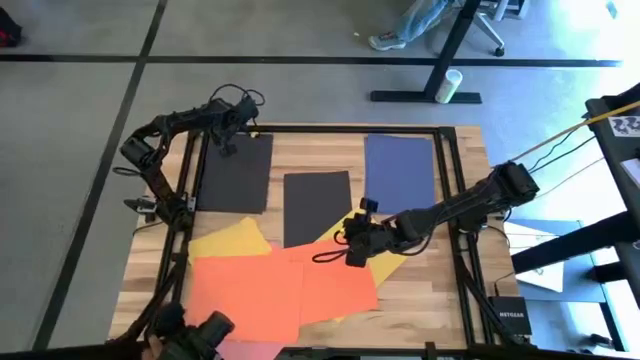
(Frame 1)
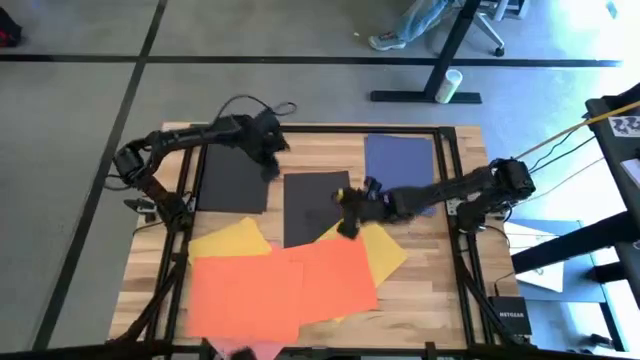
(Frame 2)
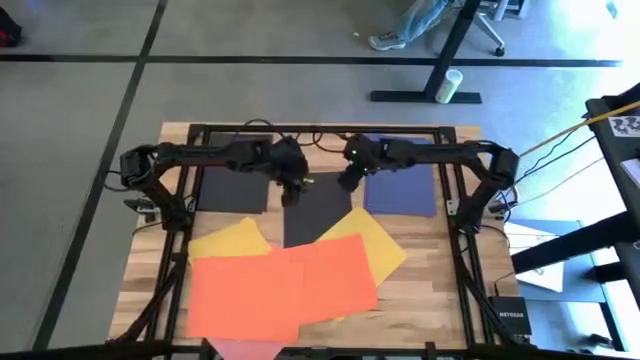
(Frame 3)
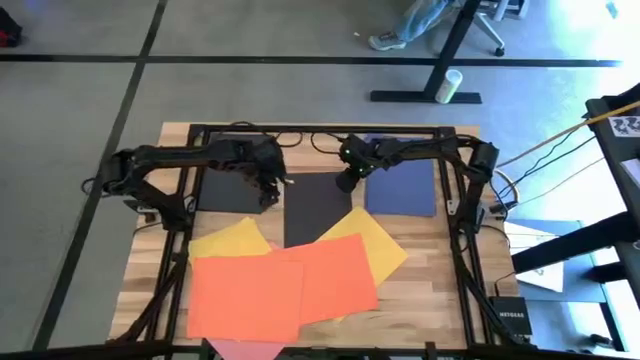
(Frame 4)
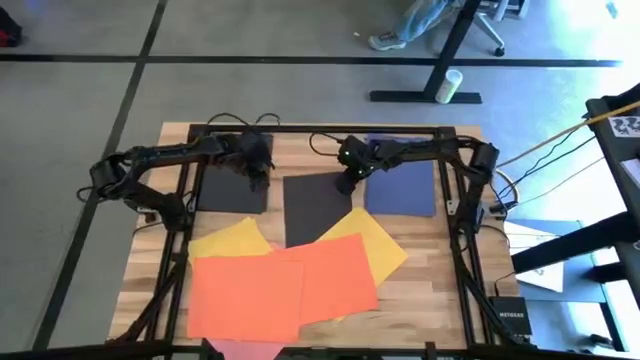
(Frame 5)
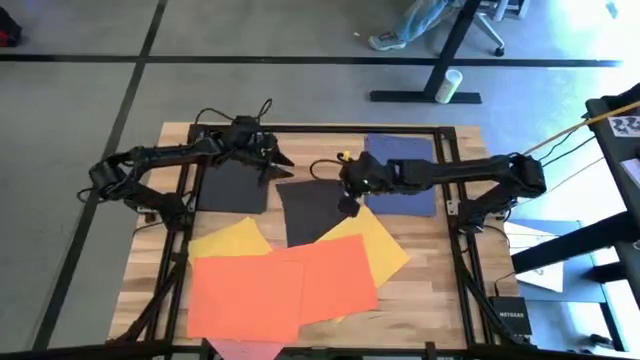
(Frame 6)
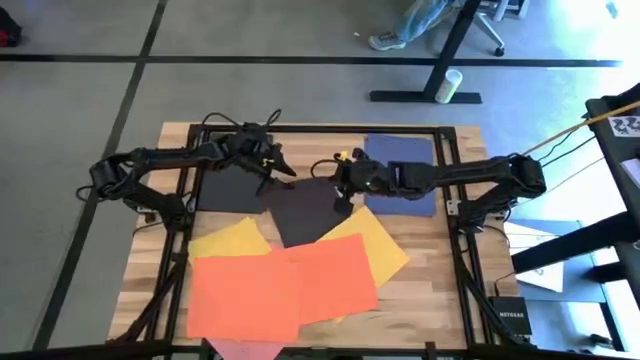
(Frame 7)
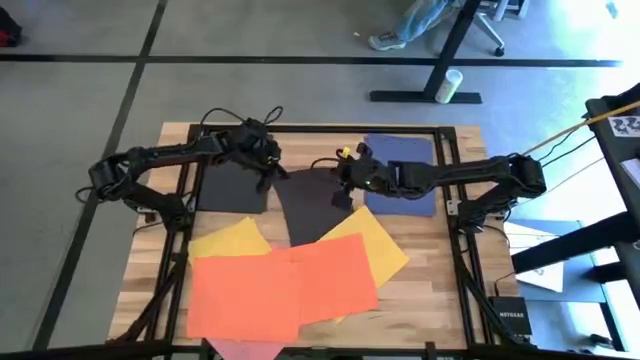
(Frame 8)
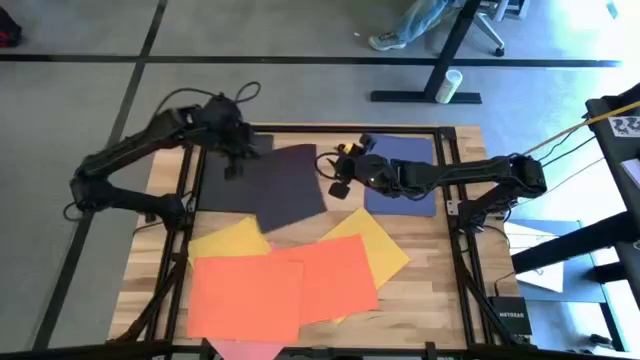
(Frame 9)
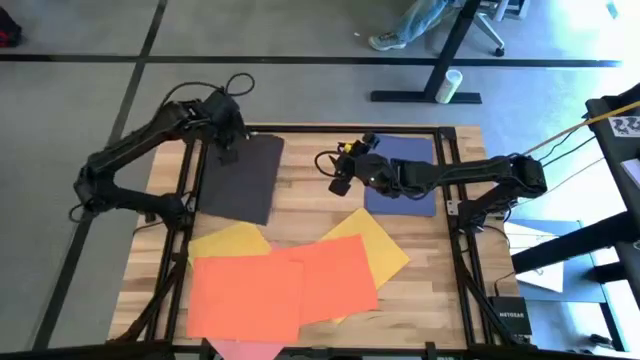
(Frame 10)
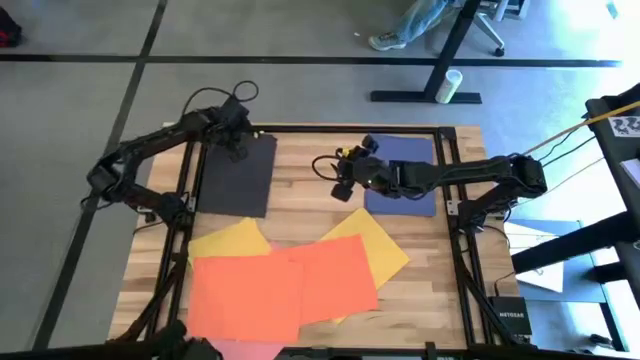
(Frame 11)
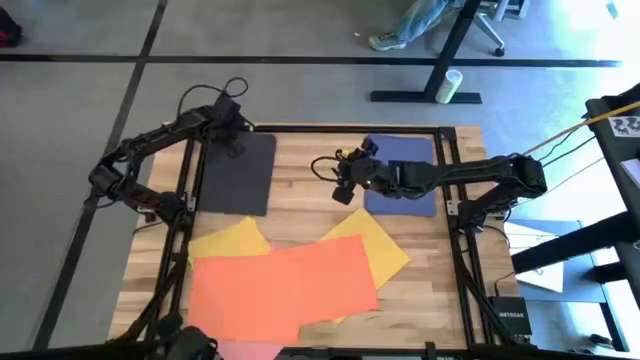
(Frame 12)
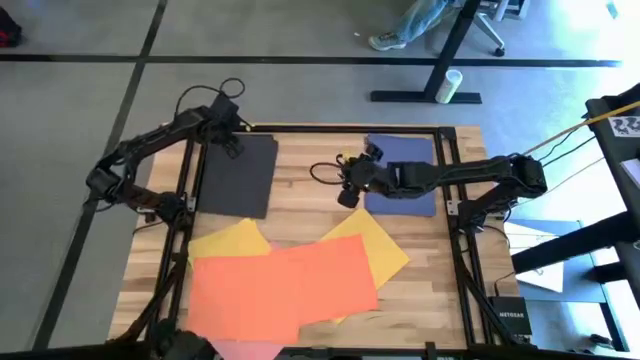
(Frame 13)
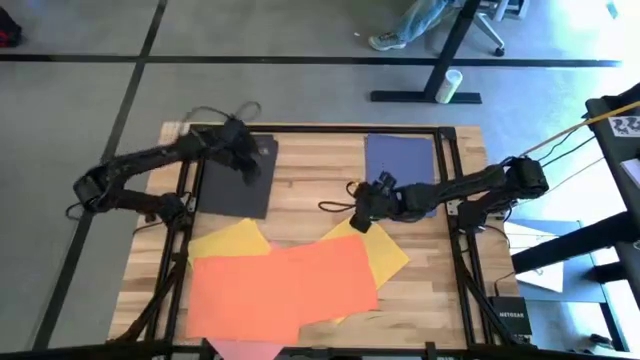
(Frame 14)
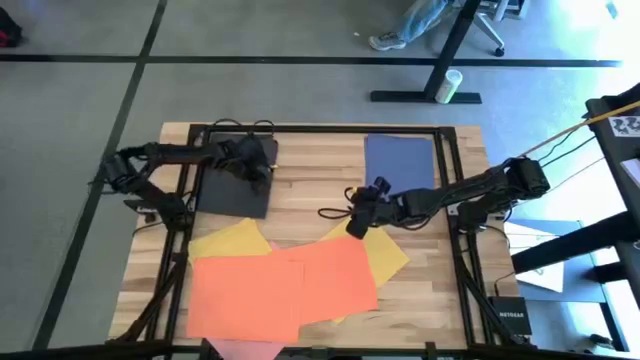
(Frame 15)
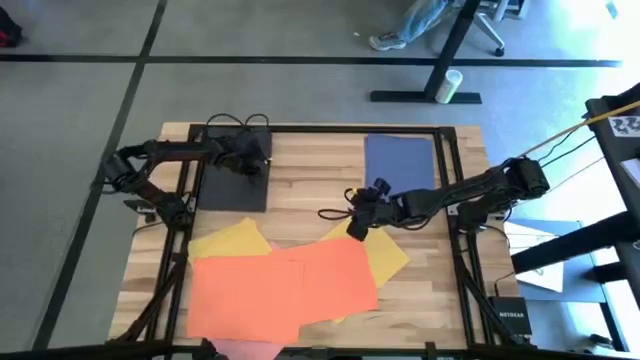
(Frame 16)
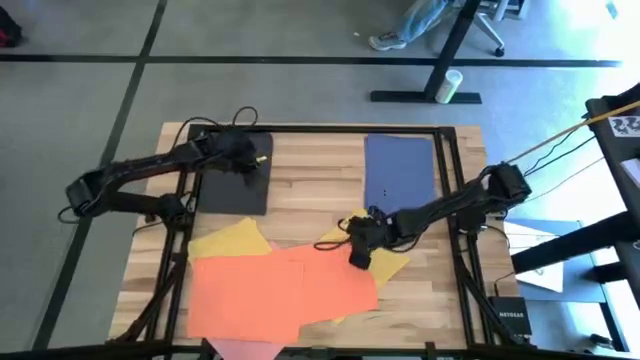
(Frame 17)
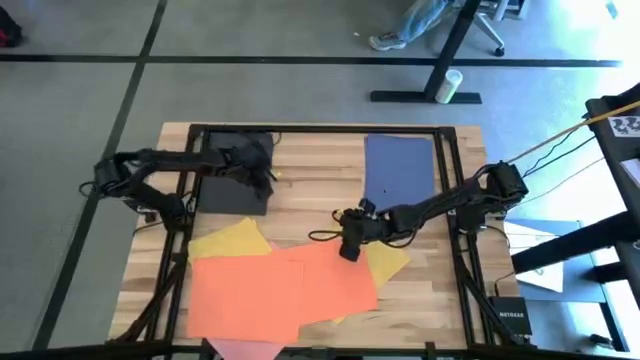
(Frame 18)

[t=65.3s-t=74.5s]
Task: Organize paper
Stack the black paper on top of the other black paper

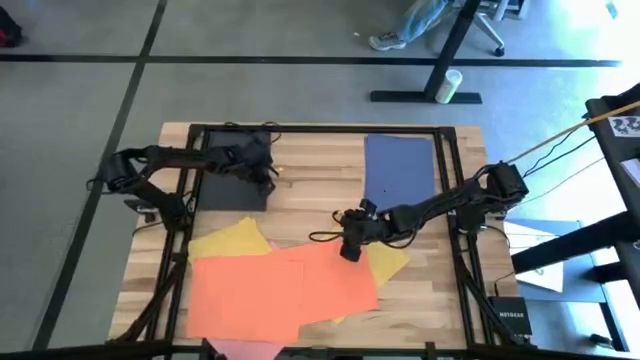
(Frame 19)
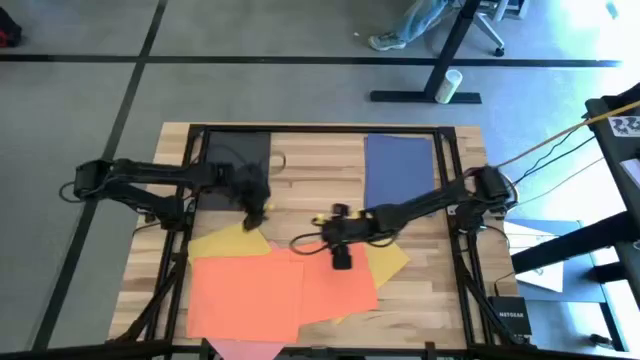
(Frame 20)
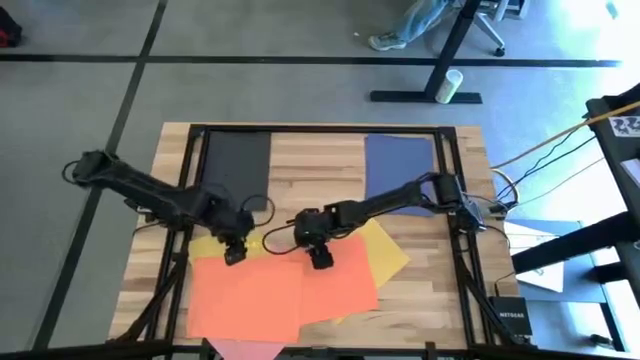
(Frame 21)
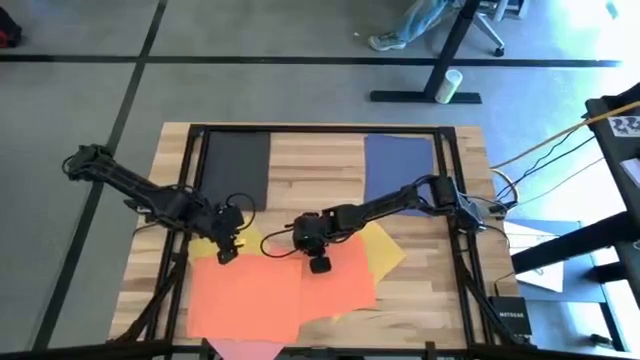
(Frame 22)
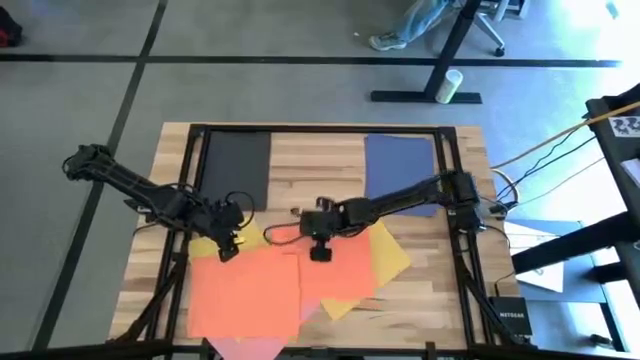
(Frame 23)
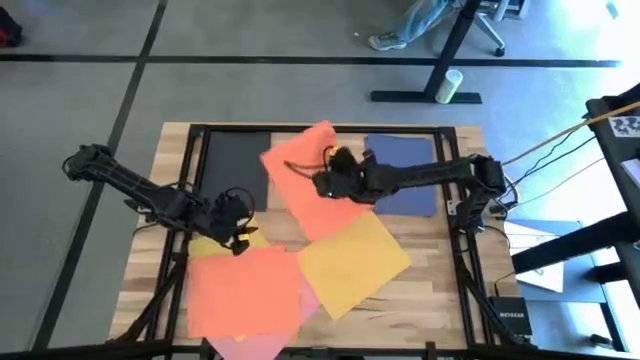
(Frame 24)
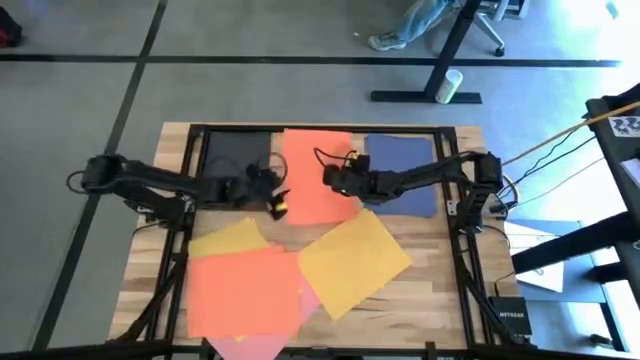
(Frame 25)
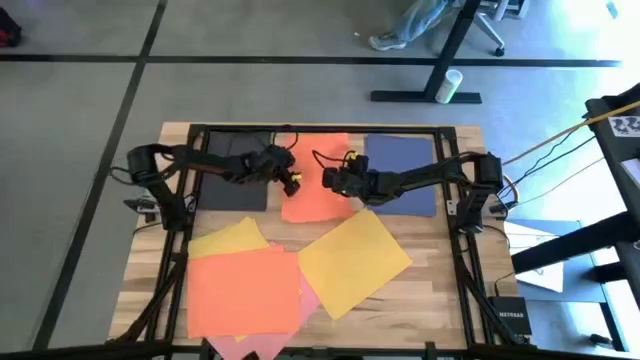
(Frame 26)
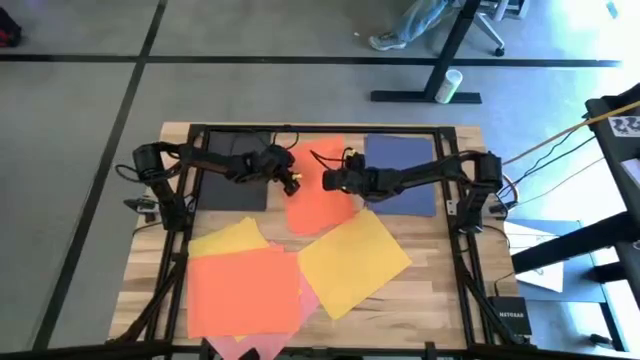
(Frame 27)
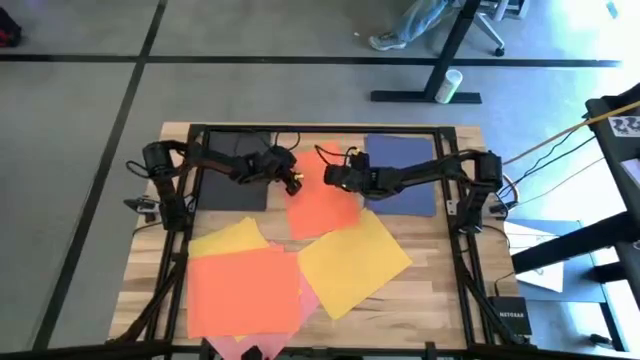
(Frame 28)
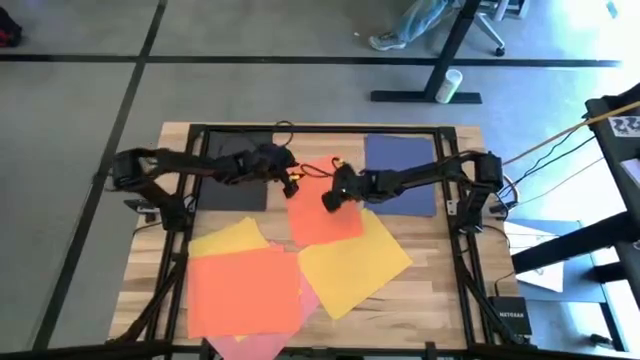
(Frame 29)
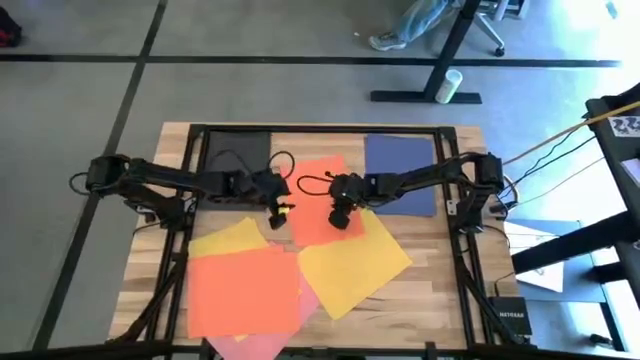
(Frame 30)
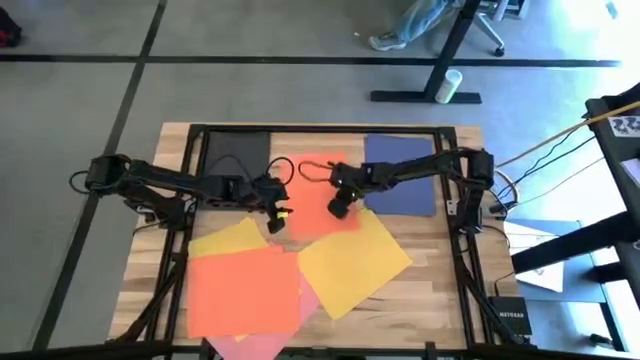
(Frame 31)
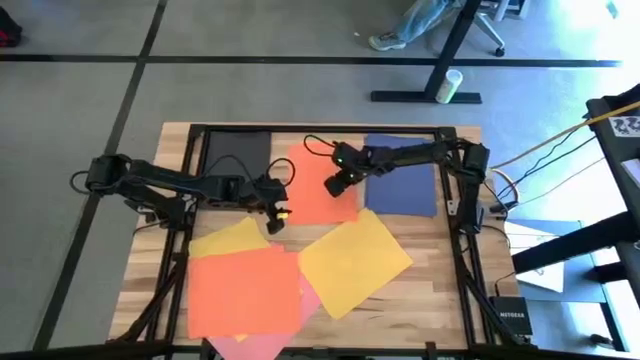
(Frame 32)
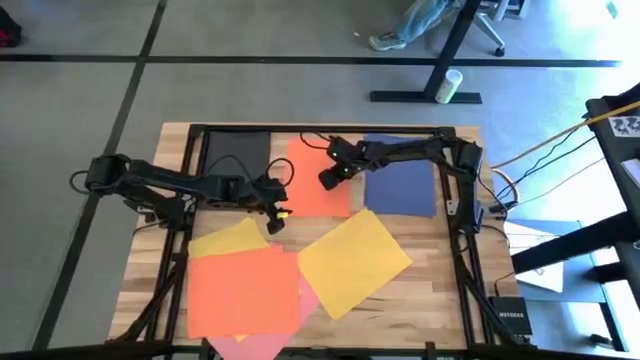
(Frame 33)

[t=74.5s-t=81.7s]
Put the orange paper to the middle top of the table

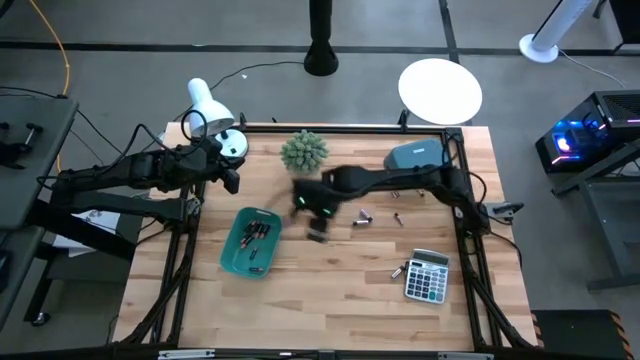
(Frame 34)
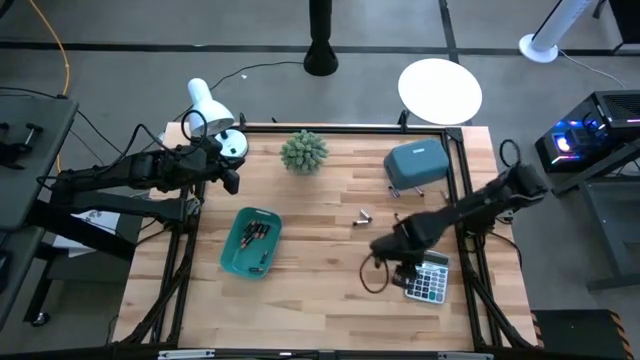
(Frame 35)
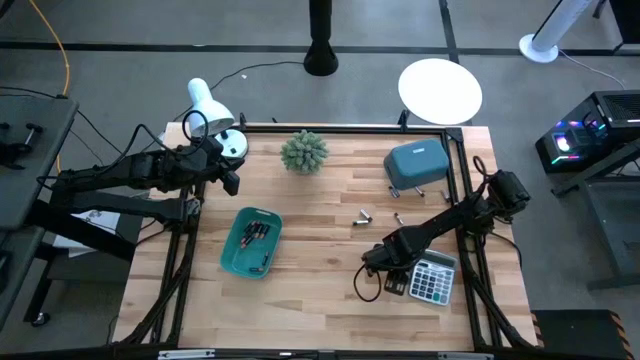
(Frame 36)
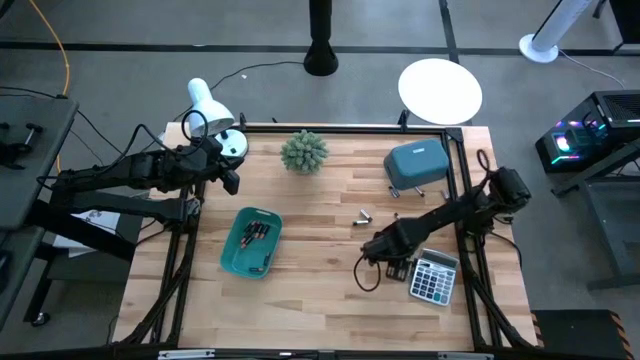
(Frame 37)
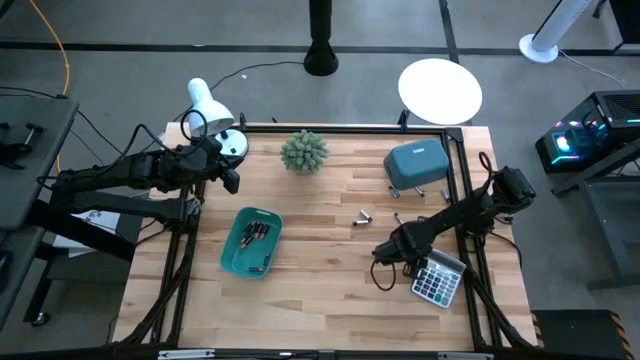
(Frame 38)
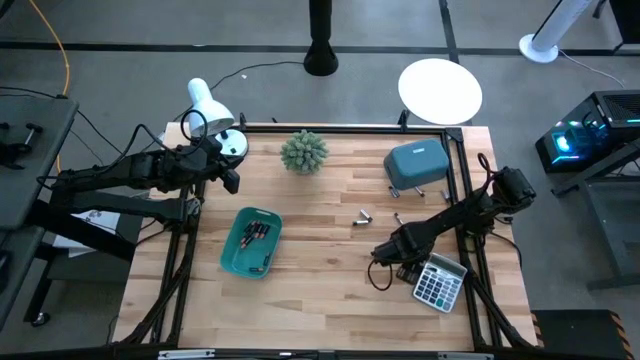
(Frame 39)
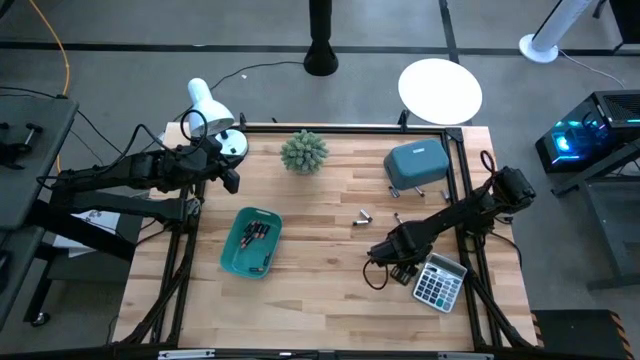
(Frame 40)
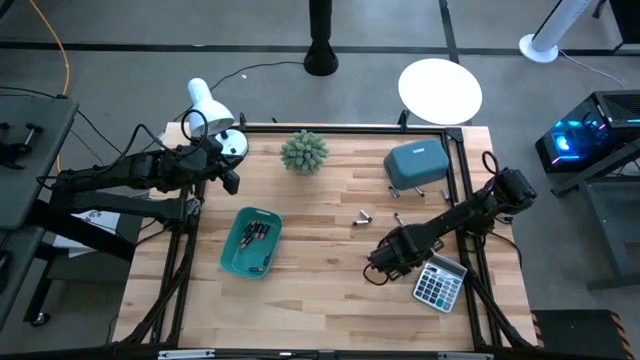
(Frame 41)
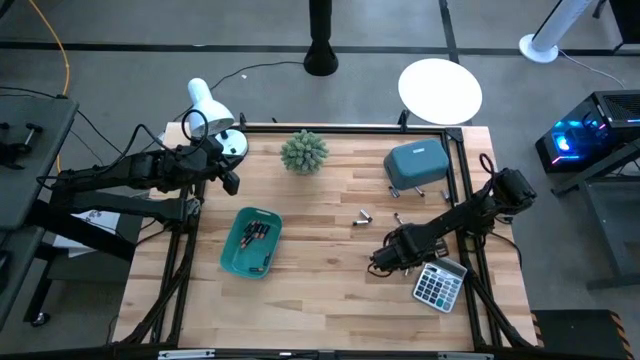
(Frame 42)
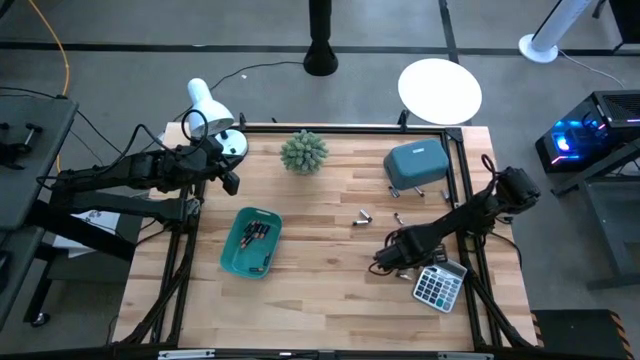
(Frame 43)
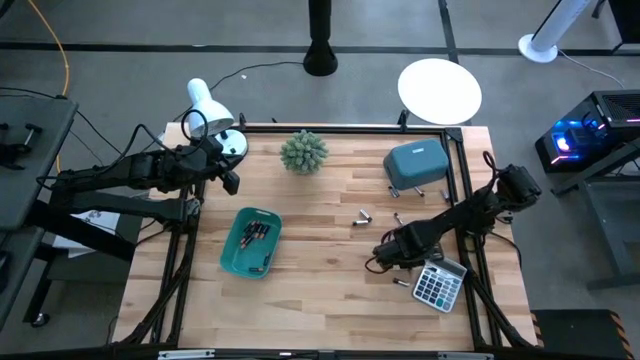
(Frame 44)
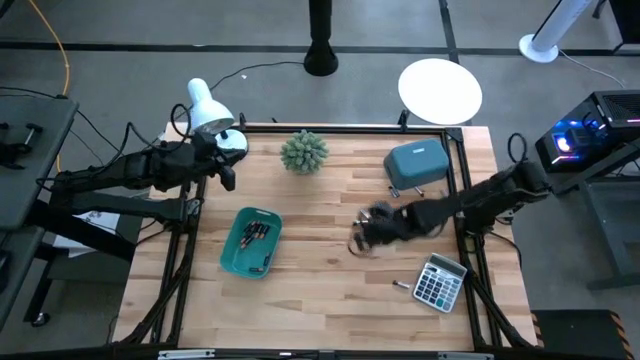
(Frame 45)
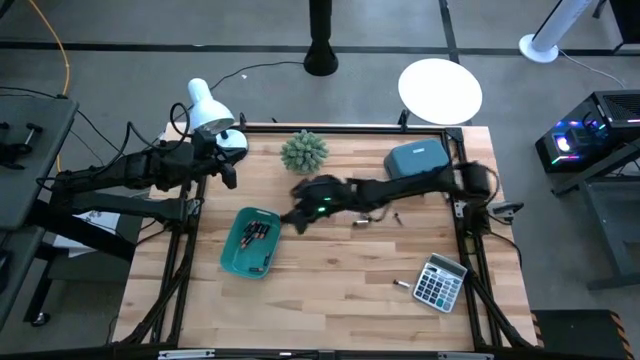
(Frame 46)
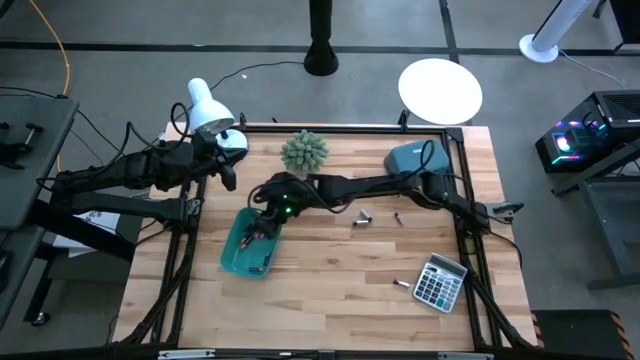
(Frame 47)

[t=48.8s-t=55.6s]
Task: Sort batteries
Put the black battery into the green bin
